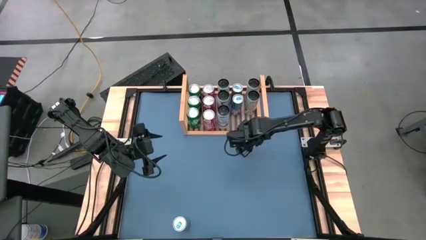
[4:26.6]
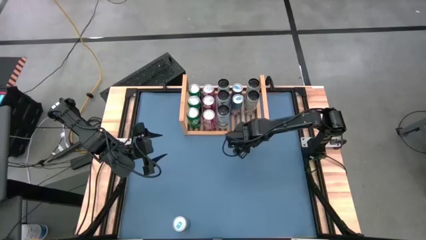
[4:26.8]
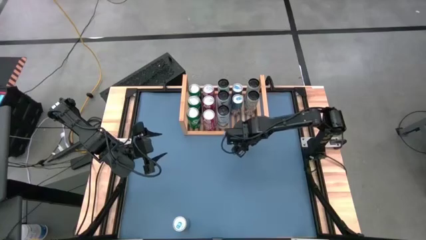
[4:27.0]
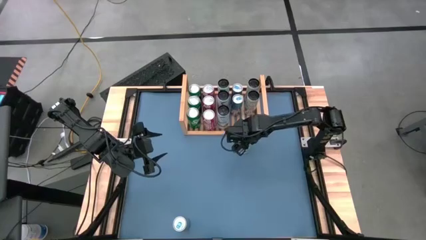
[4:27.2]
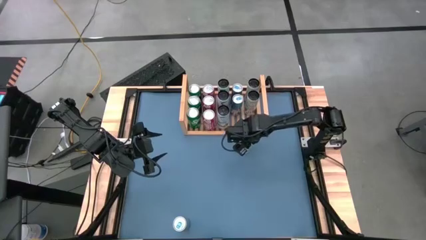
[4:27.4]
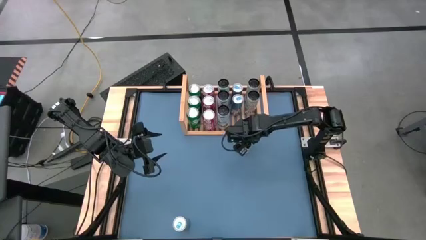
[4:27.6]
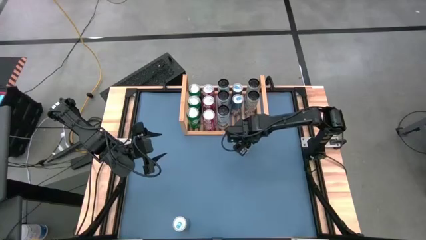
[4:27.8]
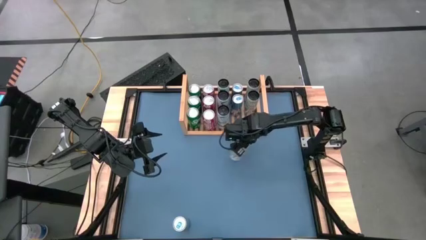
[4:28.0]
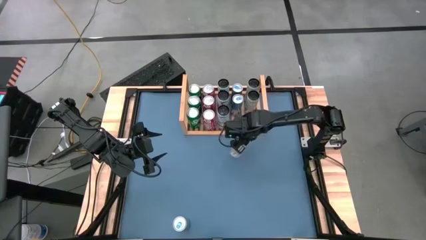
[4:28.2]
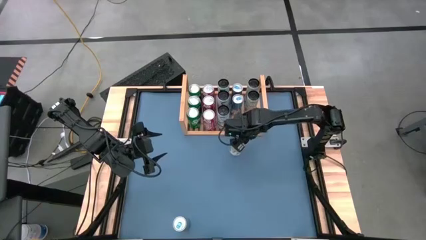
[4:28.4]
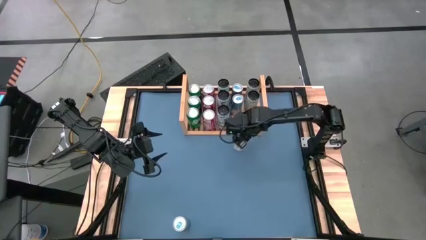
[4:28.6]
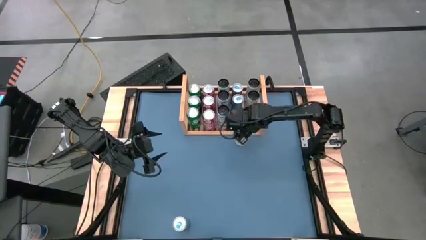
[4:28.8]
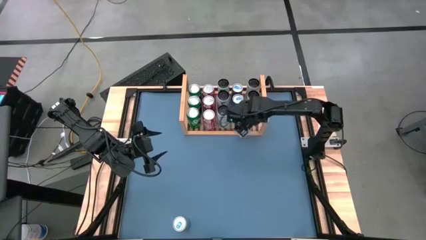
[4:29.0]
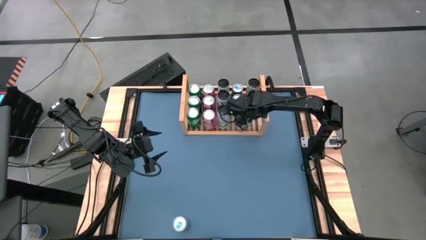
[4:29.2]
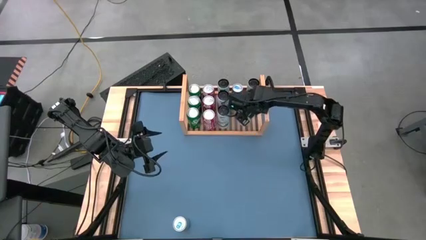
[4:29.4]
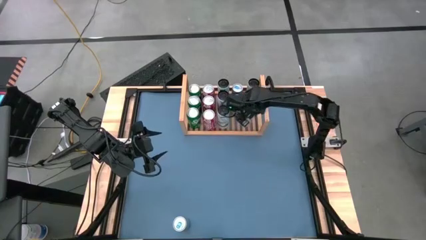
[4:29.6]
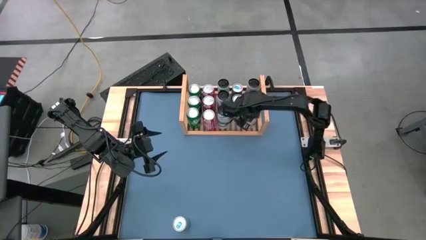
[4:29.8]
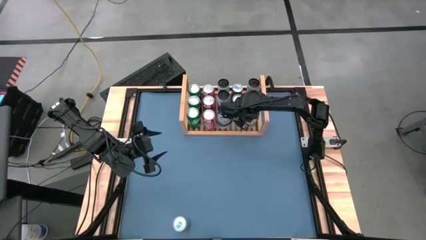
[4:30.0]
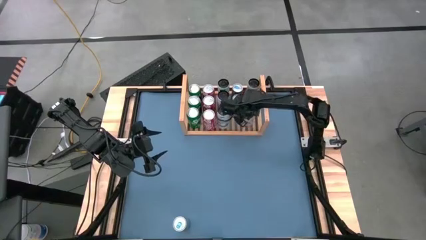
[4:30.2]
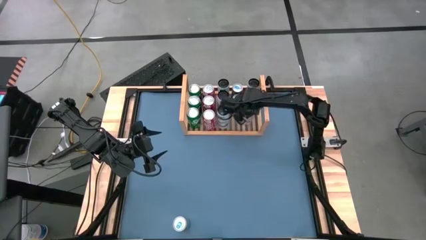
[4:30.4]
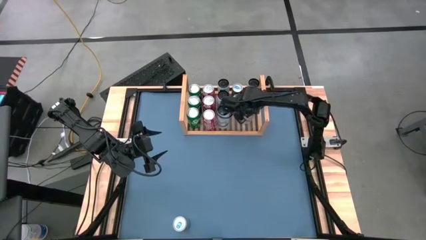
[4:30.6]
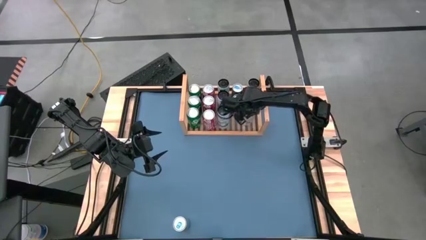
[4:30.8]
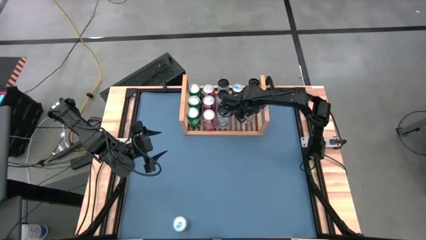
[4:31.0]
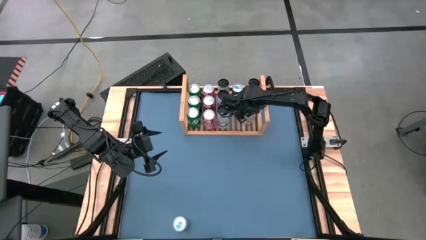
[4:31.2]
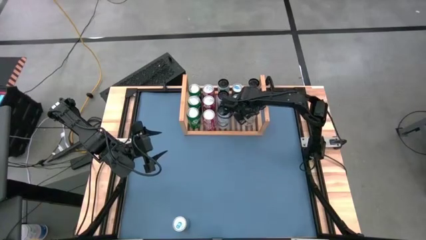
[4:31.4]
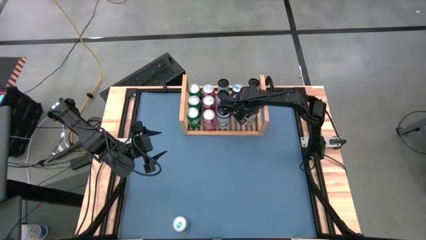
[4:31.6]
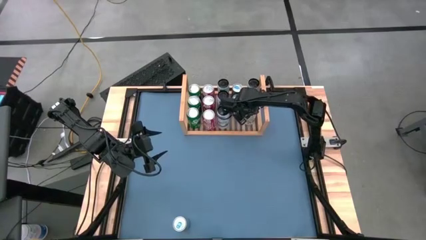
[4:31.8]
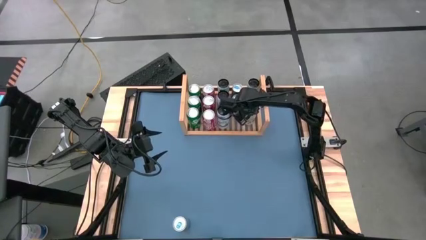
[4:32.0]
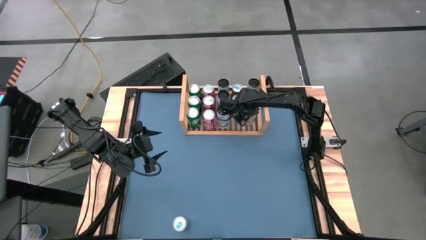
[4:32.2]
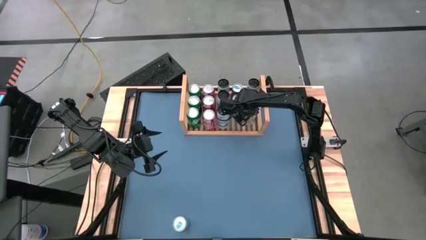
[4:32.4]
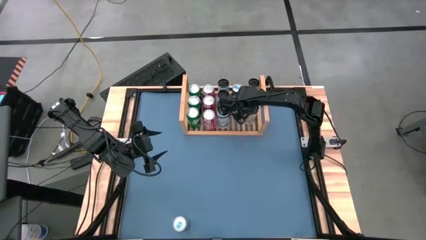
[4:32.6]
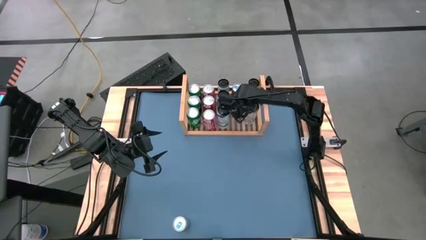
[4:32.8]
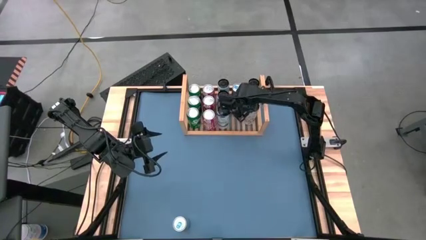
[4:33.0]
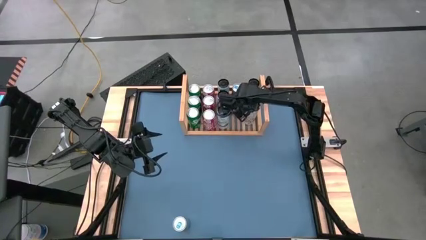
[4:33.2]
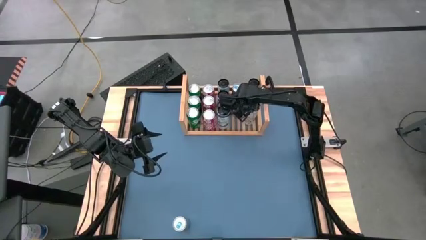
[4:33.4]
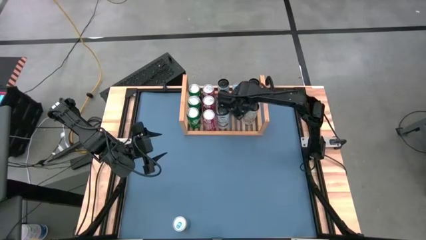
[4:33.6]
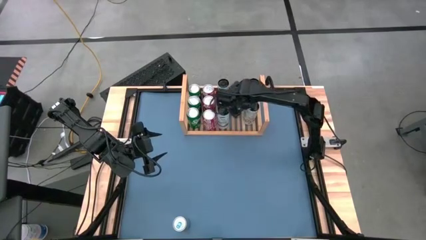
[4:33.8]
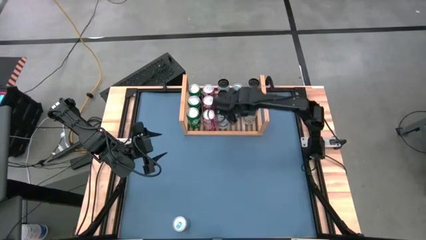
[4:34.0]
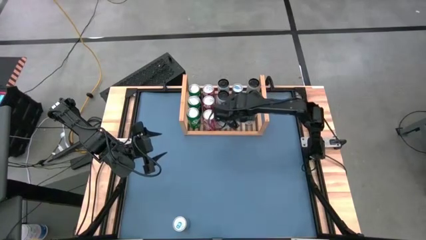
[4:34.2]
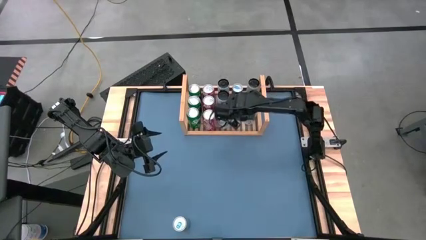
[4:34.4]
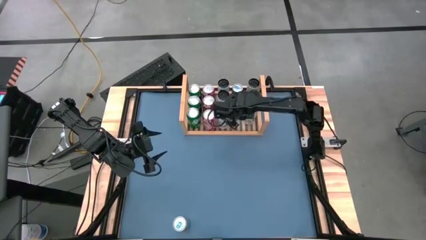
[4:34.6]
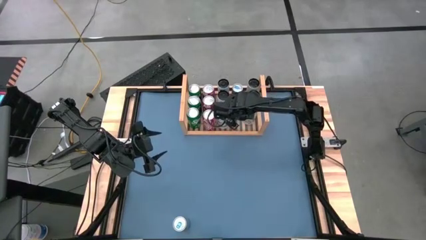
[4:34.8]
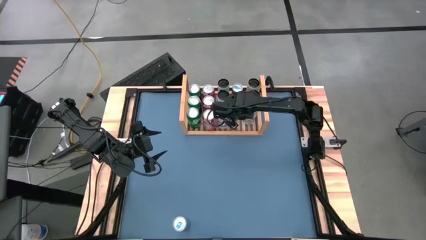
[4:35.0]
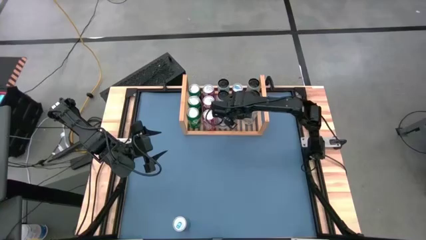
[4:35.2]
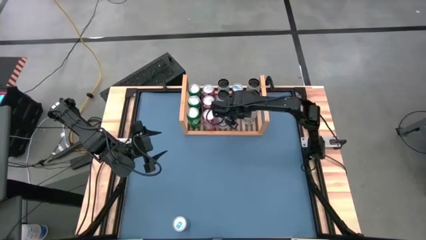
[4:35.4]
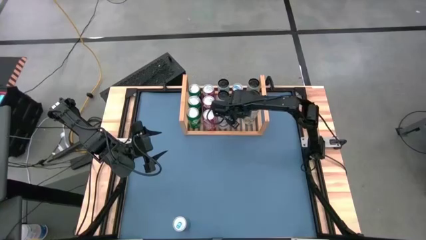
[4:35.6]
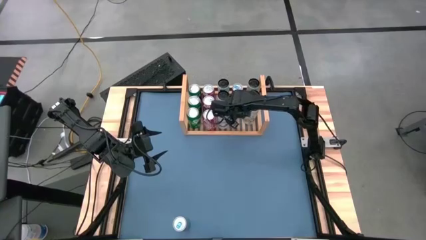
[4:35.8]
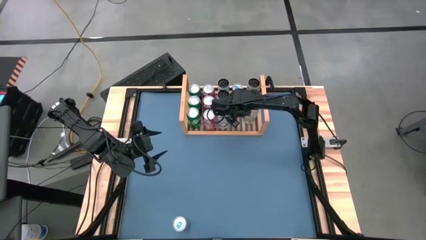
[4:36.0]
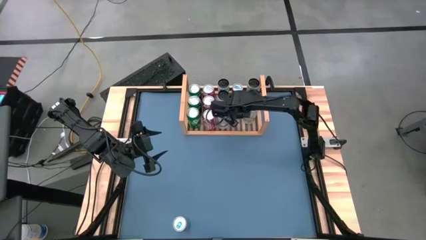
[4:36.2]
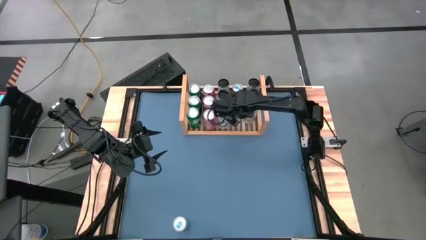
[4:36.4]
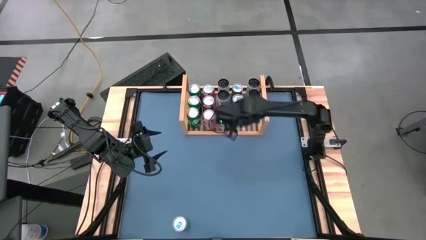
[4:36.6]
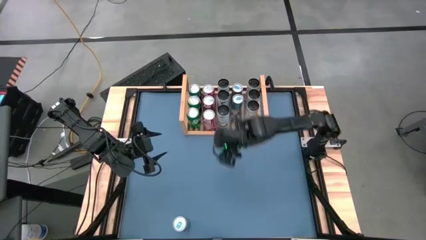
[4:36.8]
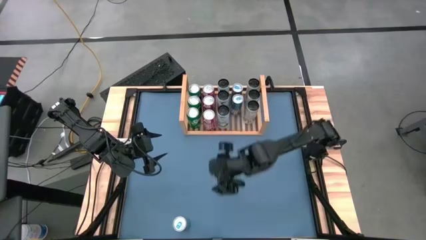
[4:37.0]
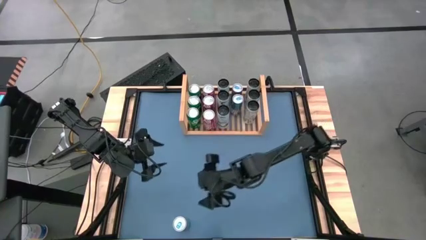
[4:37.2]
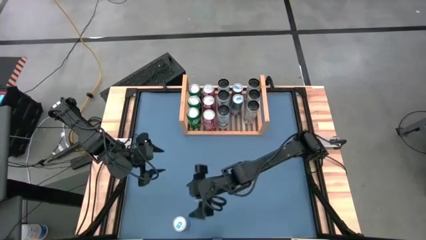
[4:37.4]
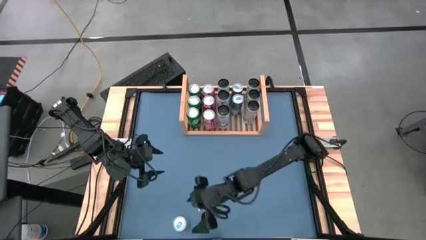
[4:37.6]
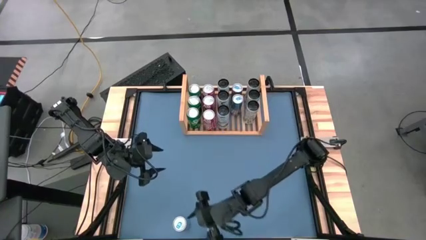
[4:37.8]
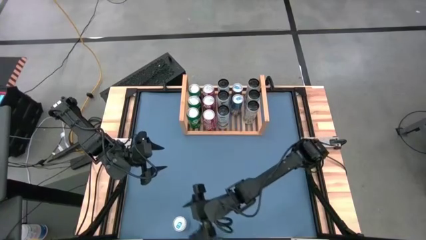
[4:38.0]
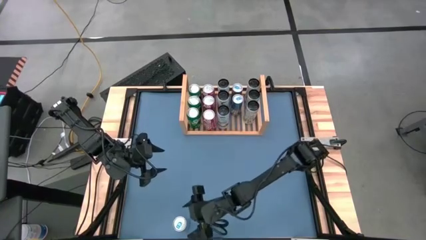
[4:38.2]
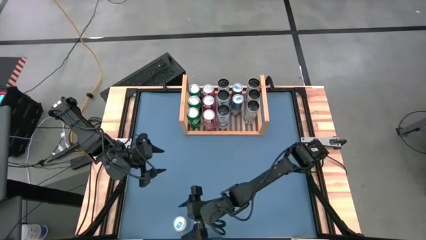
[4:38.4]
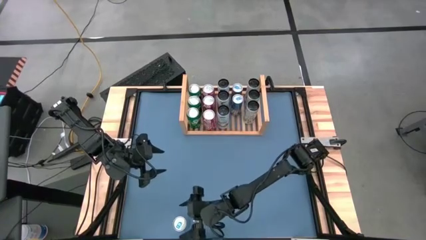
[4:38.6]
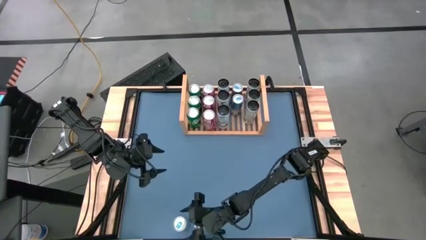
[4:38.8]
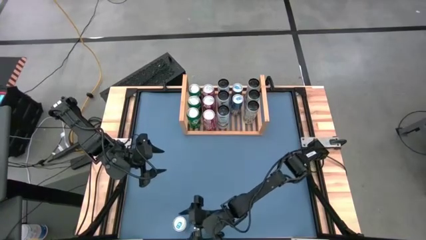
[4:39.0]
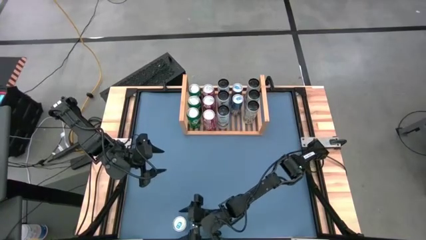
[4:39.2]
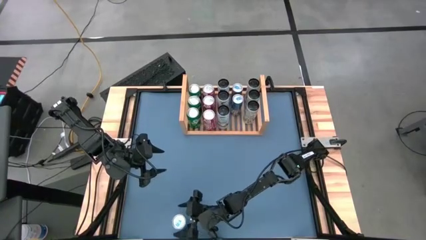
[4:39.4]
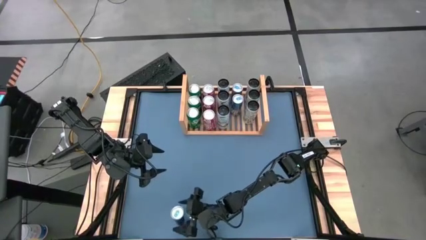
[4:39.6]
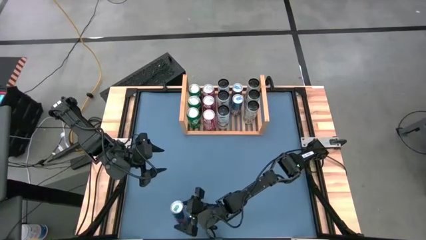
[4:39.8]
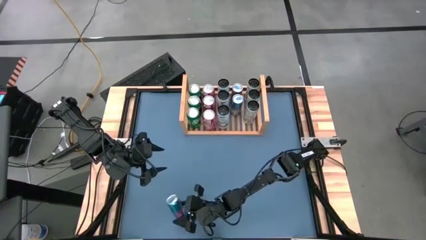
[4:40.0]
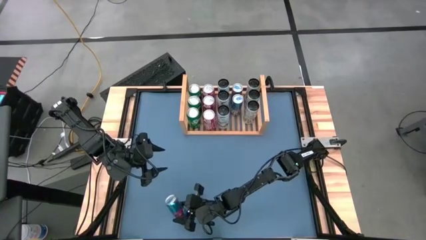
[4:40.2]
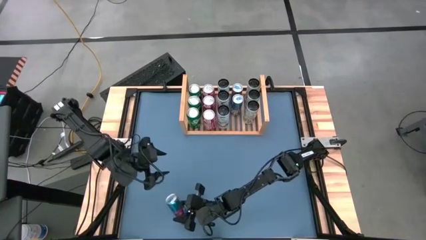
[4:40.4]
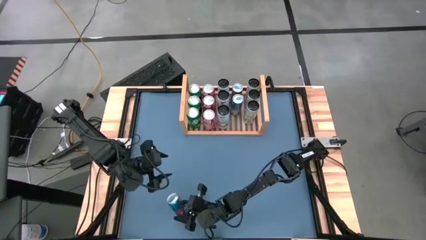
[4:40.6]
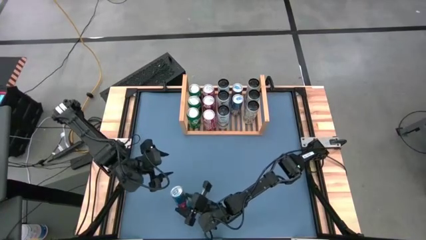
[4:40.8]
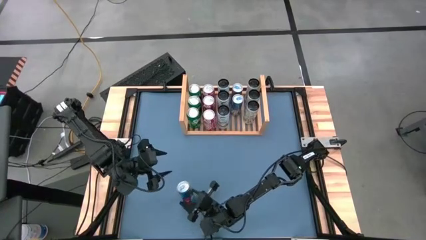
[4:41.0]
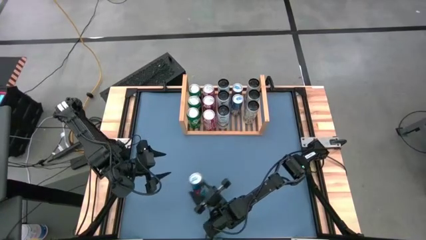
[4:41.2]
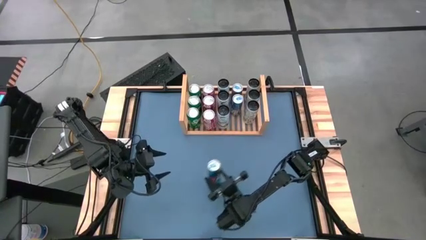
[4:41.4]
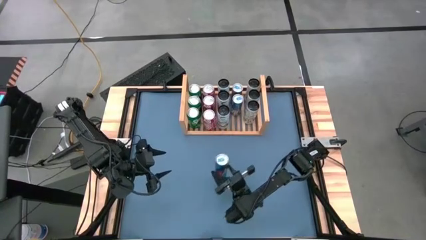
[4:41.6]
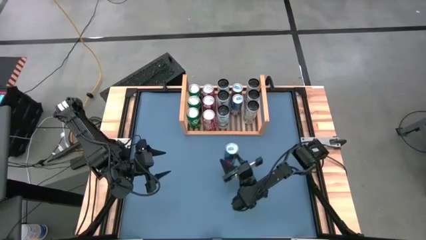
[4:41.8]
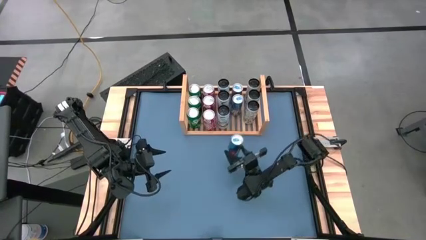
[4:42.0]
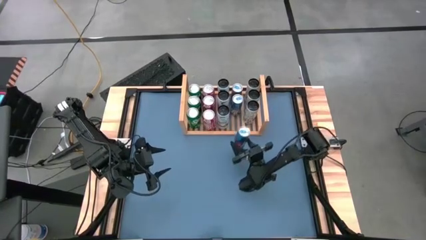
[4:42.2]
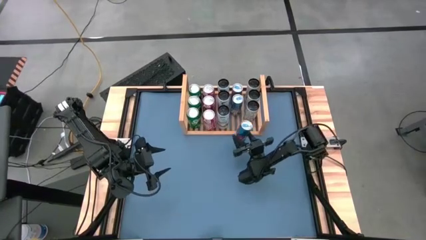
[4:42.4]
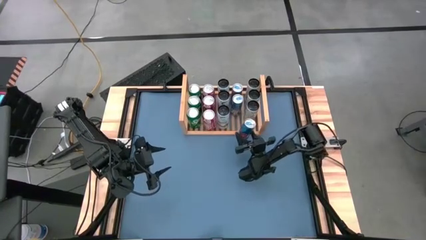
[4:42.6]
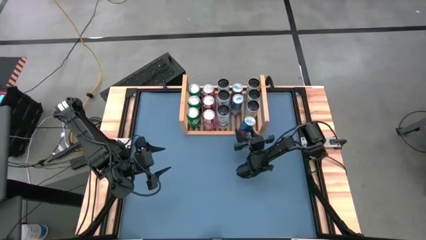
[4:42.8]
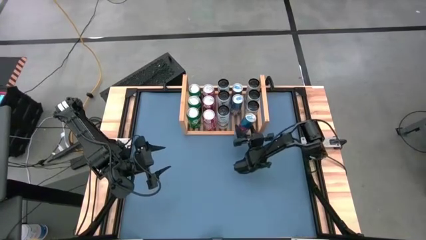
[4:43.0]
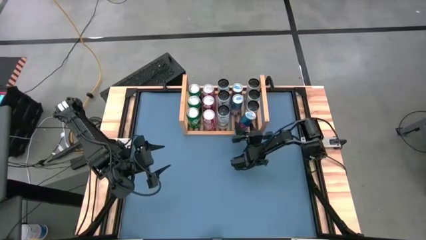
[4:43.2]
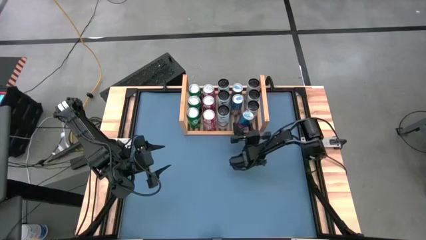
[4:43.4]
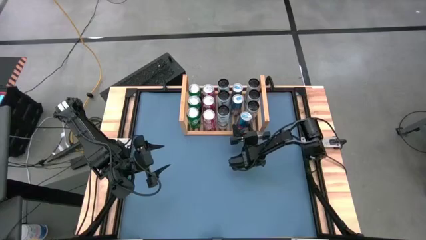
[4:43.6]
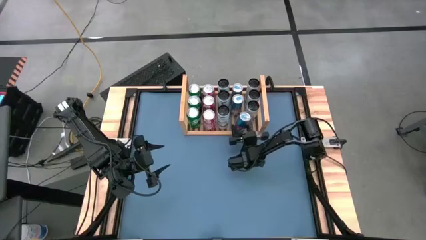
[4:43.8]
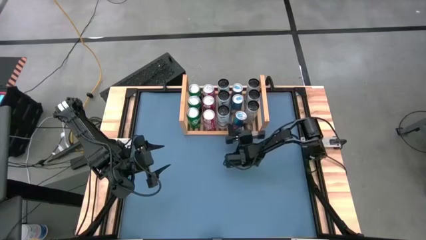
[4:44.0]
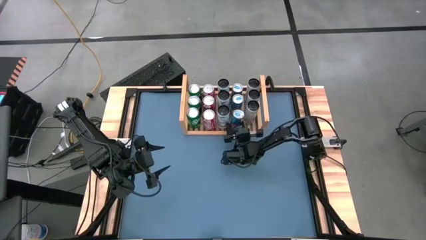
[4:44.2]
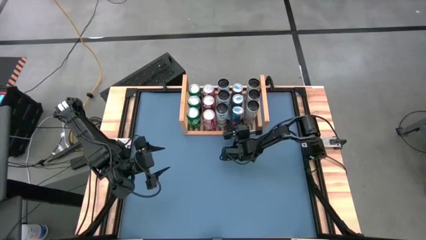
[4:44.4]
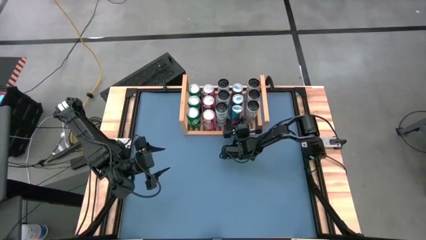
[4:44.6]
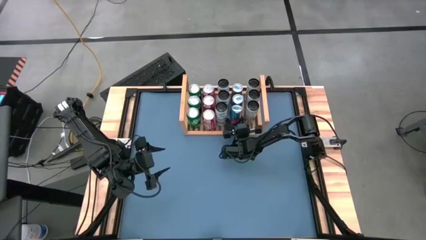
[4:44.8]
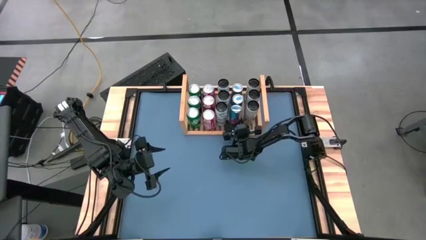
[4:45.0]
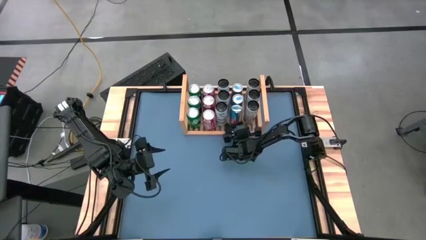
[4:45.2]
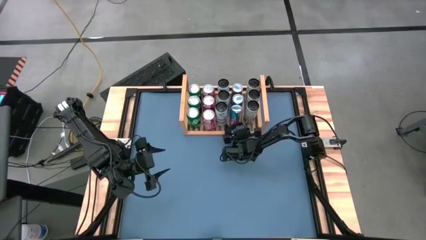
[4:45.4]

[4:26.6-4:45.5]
Task: Place canned beverage on shelf
Put the top middle left blue can aligned with the blue soda on the shelf
